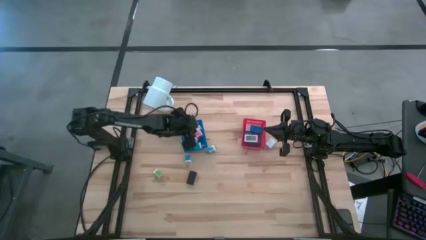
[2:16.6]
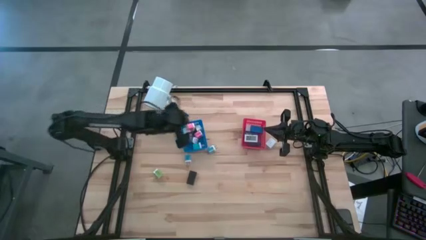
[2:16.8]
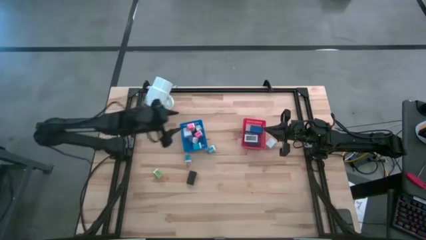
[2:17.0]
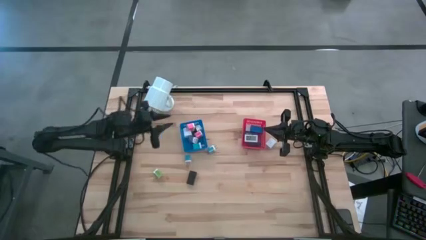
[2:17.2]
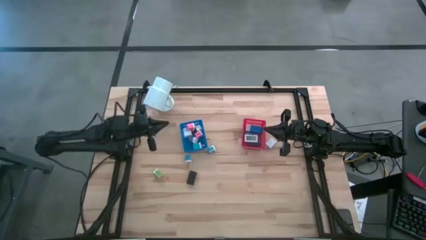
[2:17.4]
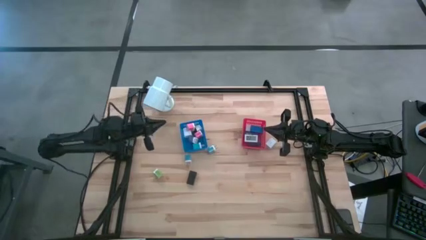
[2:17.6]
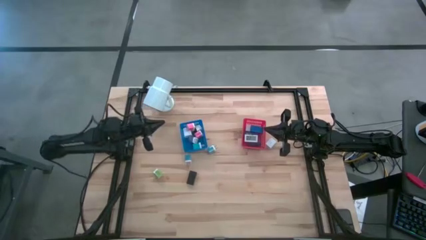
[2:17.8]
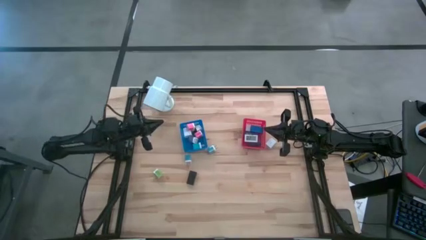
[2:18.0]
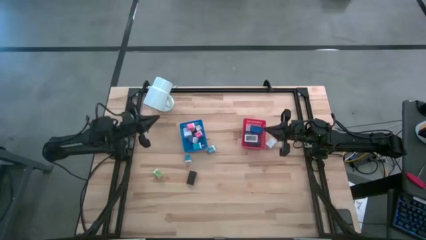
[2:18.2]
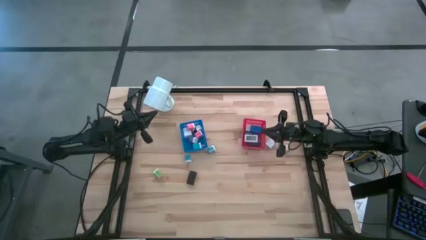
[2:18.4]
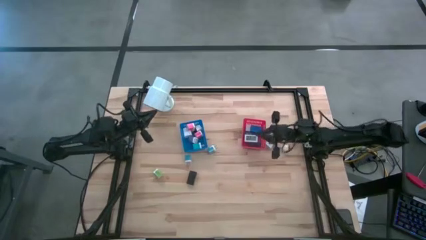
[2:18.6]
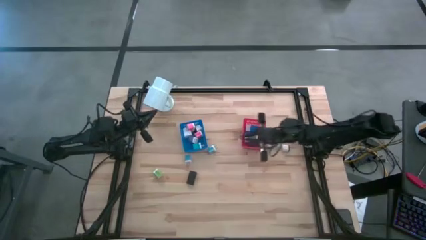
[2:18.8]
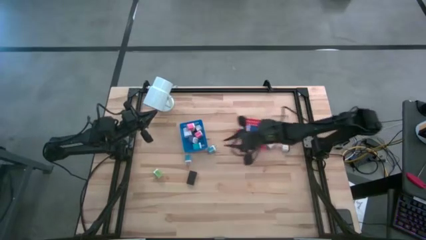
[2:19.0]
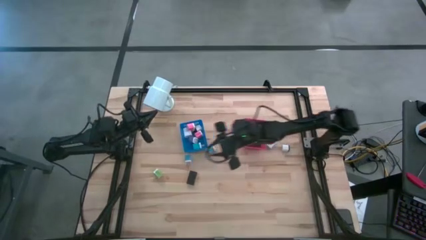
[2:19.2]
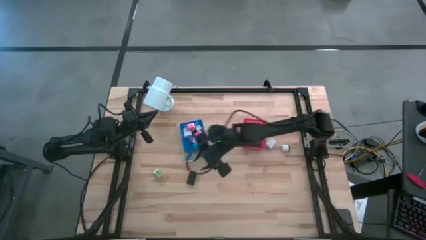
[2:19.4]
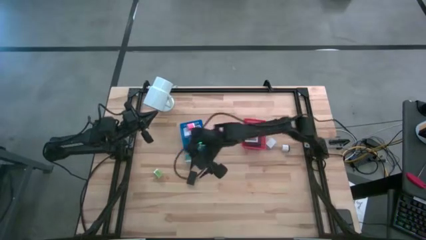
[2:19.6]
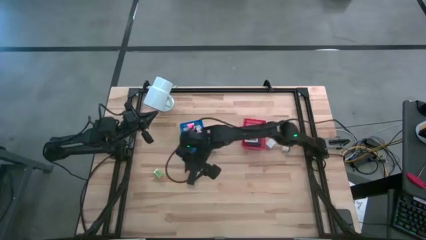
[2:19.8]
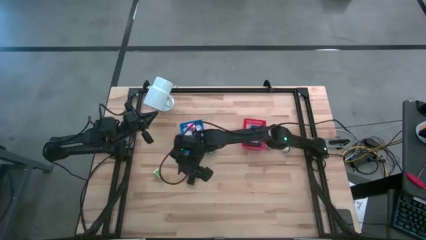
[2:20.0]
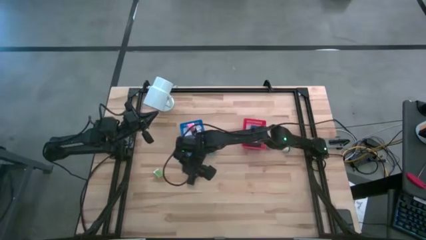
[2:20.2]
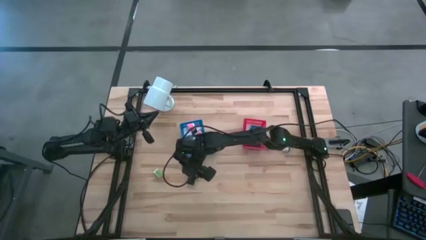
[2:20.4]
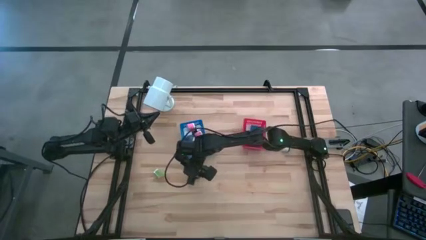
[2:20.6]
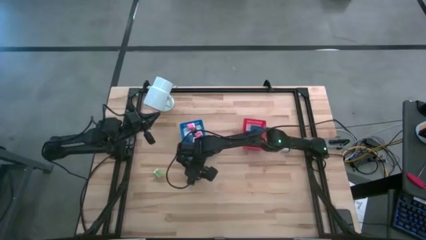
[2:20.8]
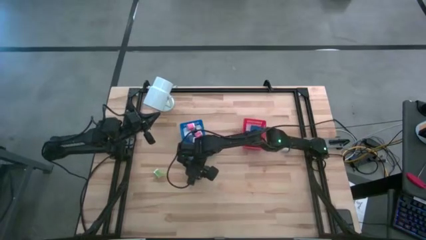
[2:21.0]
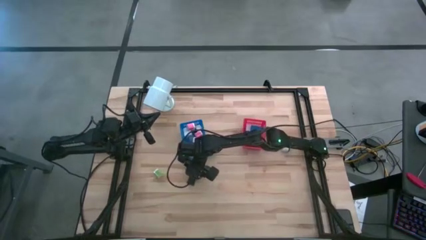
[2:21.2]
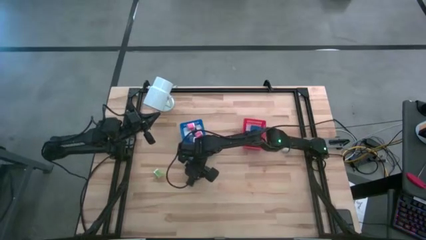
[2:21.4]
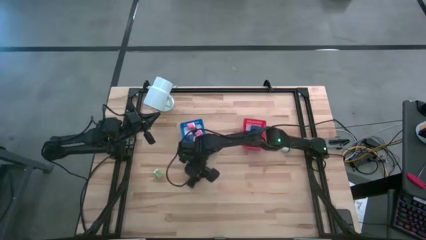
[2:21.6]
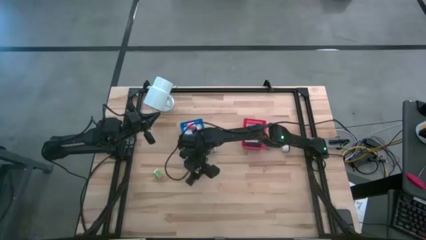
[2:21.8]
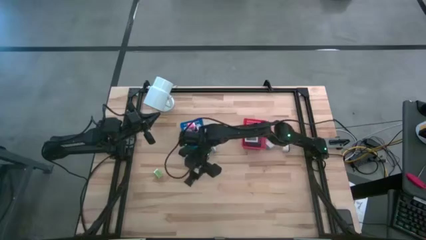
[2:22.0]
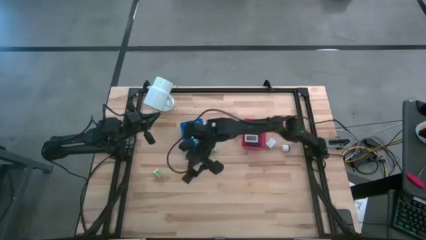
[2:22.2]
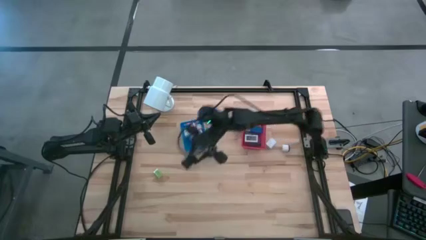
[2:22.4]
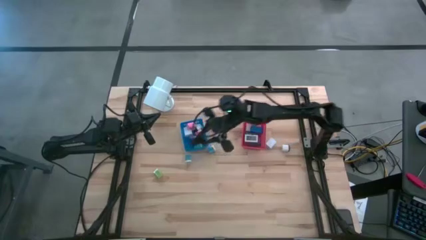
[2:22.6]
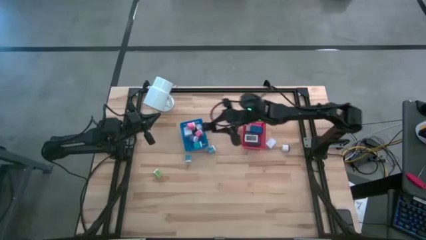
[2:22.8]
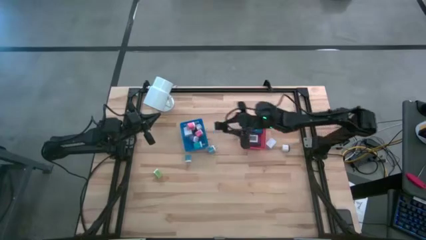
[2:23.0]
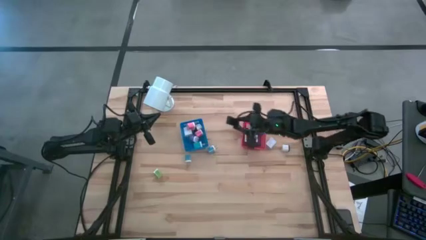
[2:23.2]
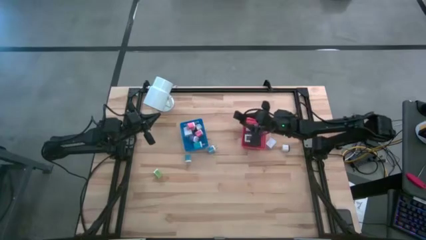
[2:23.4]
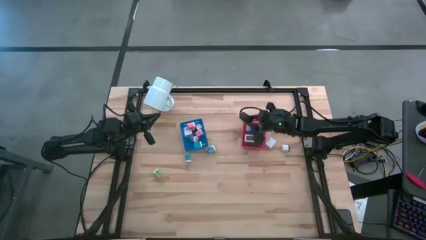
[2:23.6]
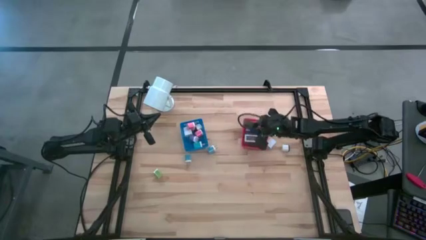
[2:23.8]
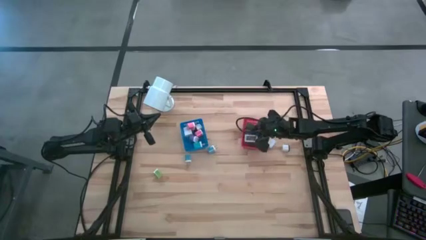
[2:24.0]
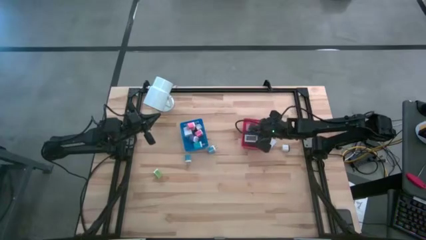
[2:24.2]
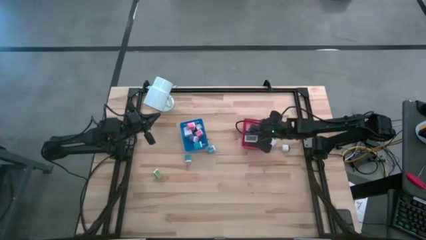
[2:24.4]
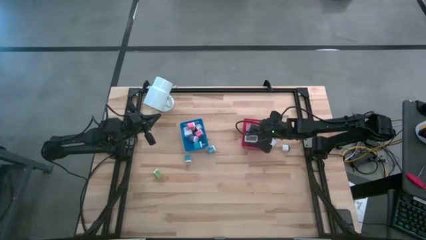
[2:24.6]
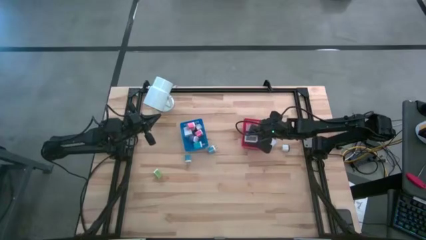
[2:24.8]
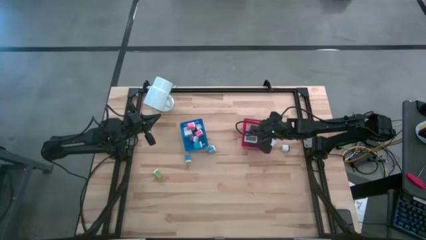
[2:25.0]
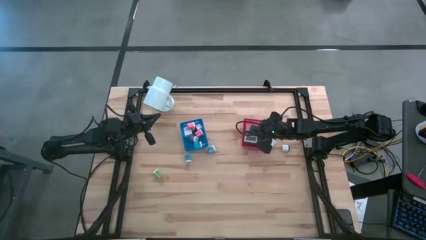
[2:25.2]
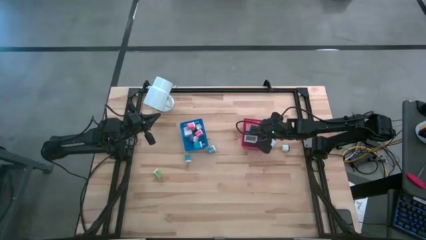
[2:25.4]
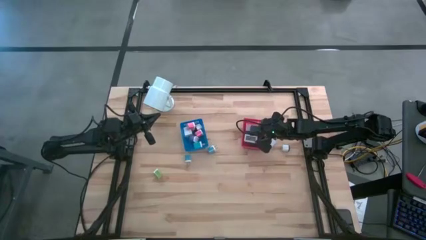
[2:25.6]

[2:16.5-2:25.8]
Task: Pick & Place Office items
Put the black digital clock into the red bin
